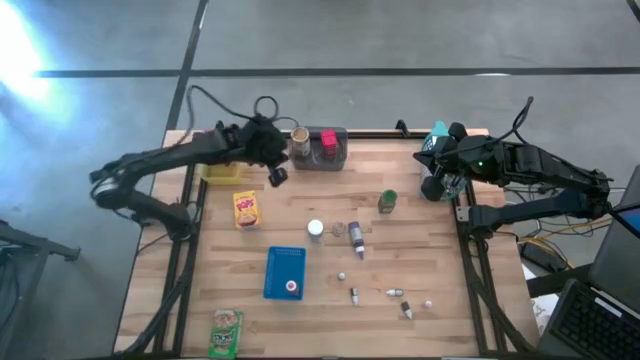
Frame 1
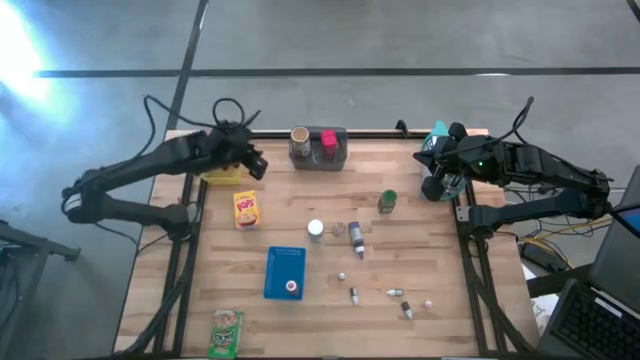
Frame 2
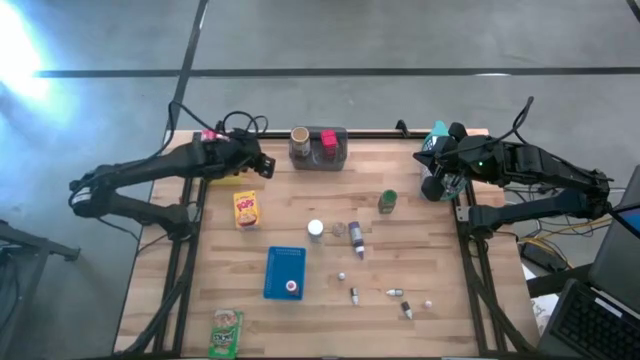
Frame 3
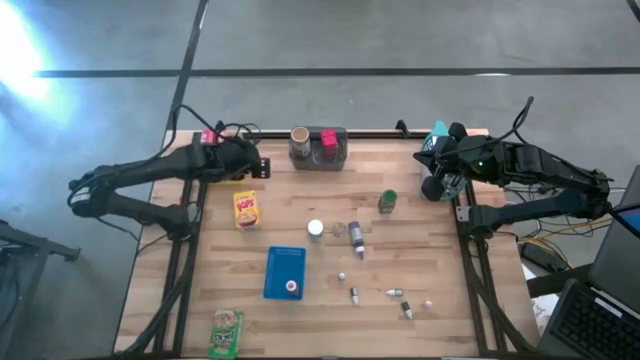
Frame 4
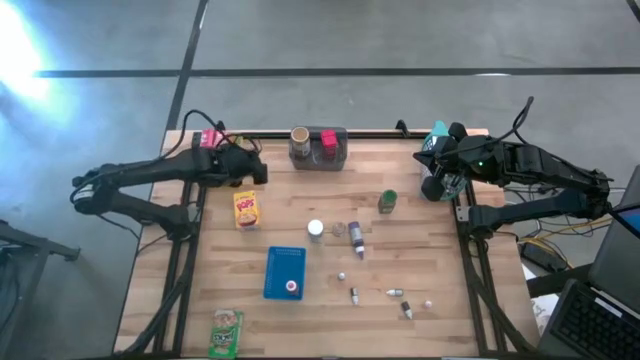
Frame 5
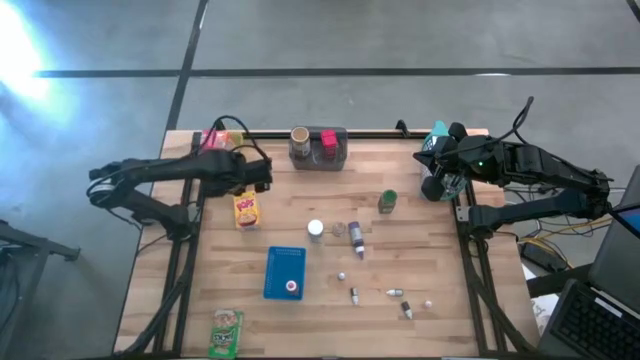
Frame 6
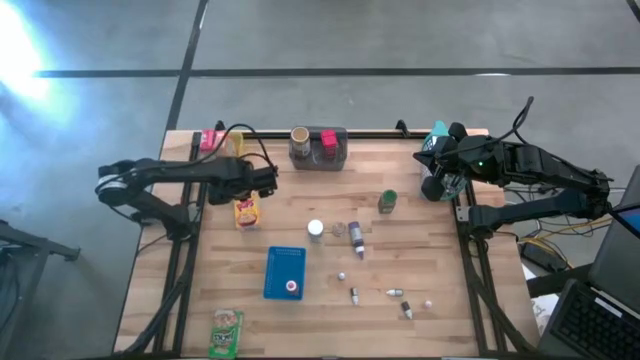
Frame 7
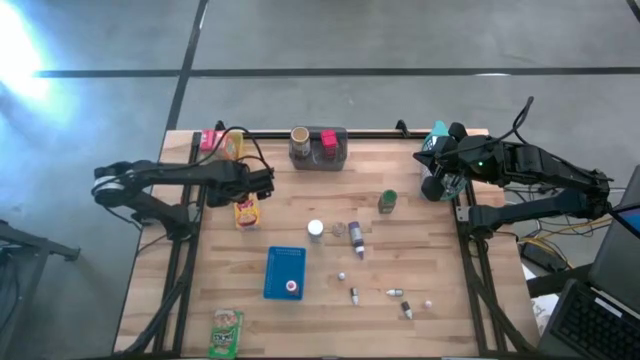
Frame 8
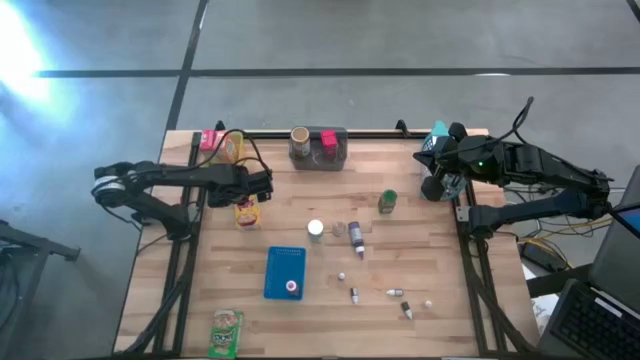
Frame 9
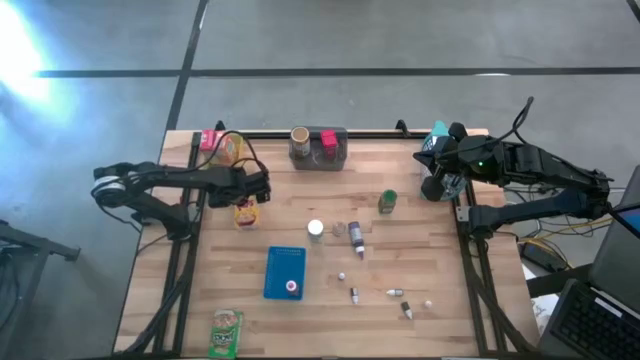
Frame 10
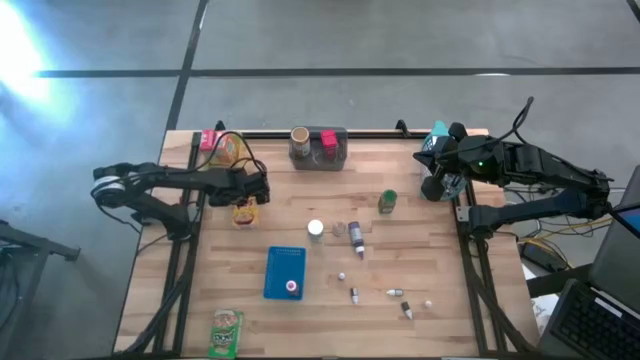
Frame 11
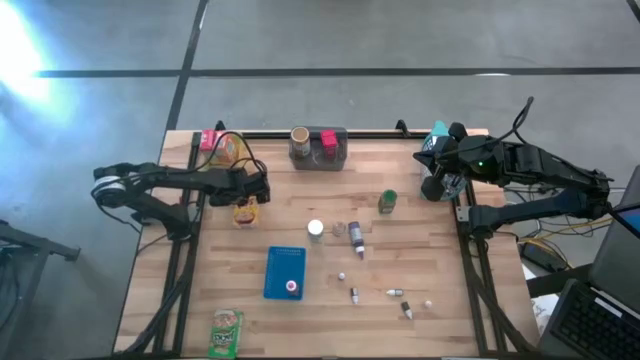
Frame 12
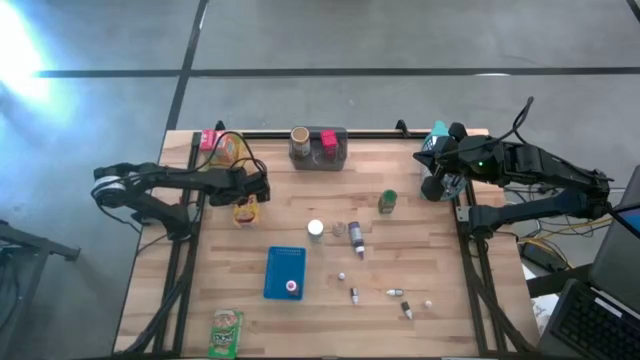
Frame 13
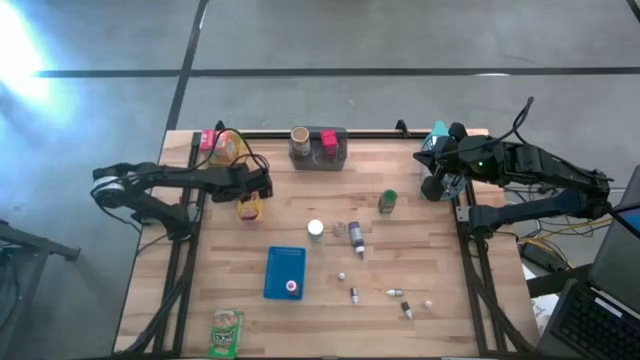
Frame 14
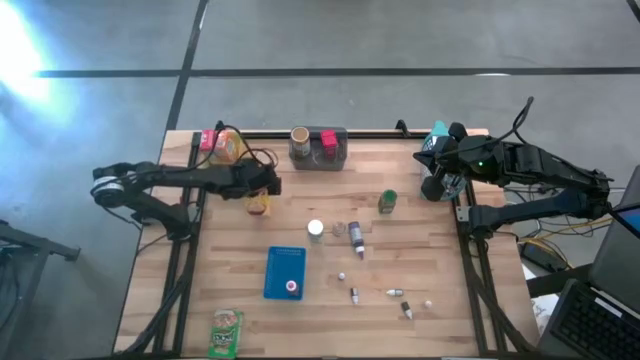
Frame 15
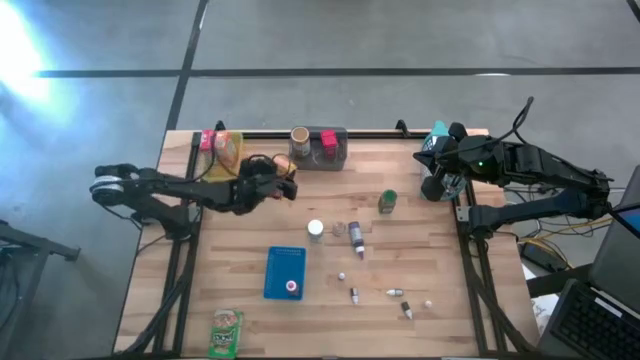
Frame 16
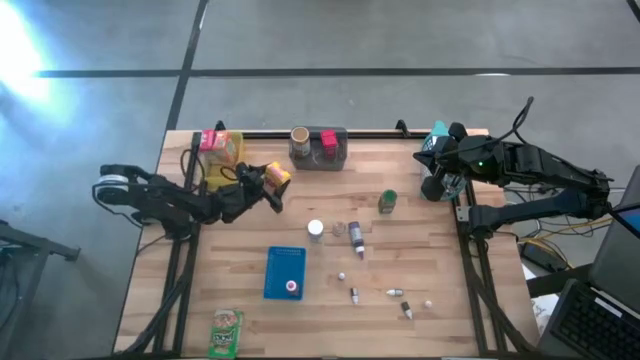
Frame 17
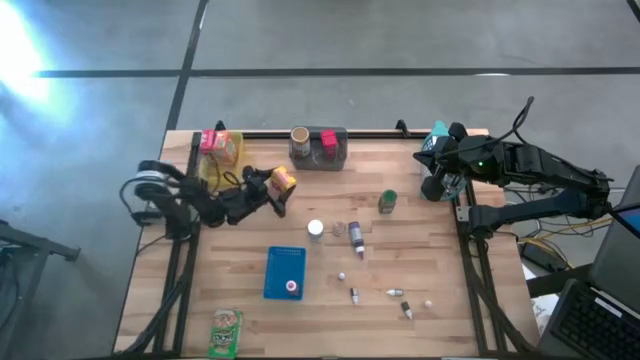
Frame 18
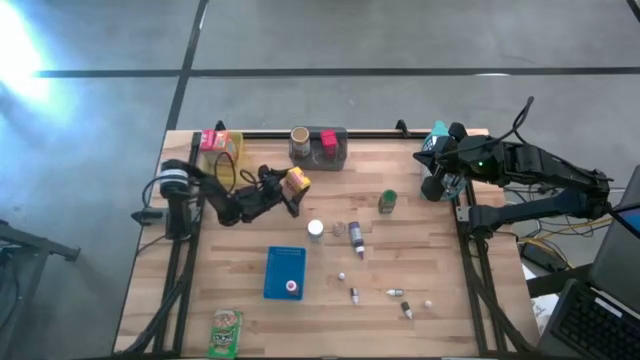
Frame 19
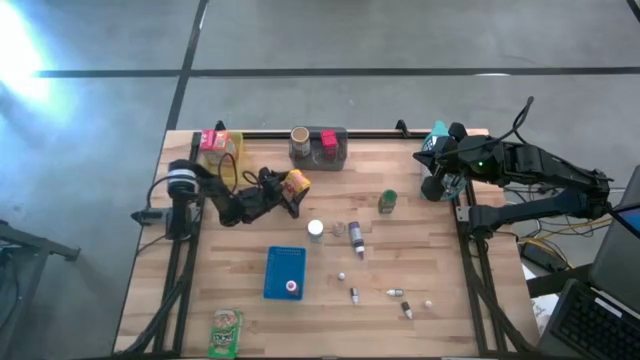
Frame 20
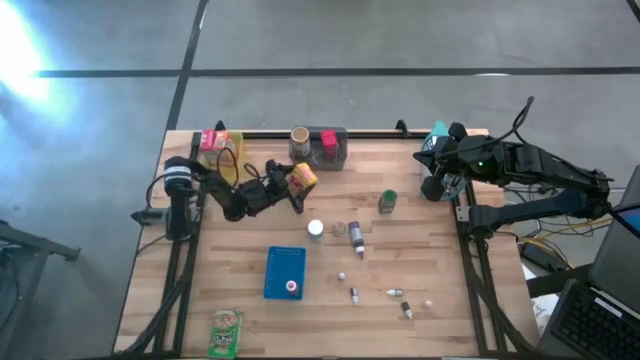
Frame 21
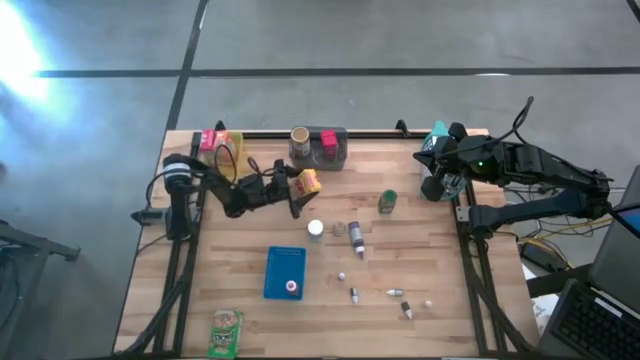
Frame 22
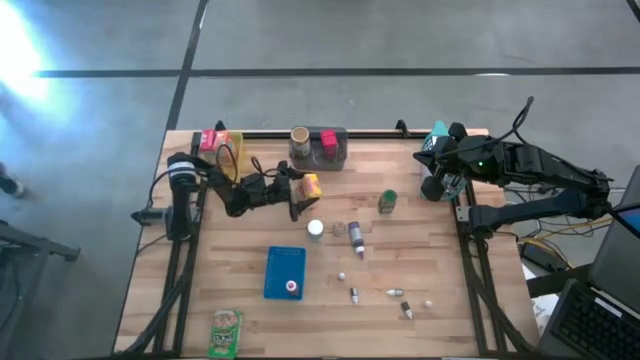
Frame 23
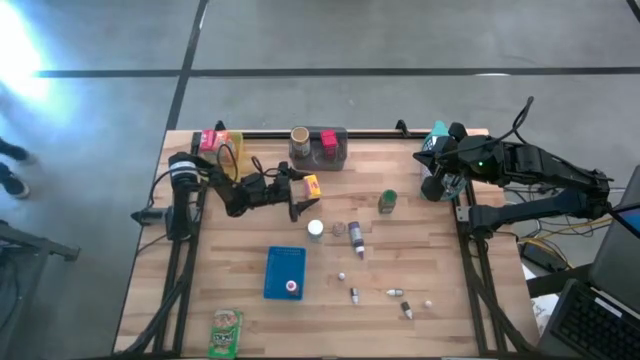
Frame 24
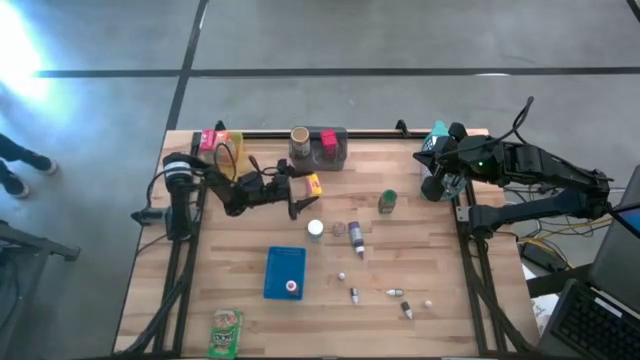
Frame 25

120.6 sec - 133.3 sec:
Task: Pick & Place Kitchen Items
Put the yellow cereal box into the yellow bin

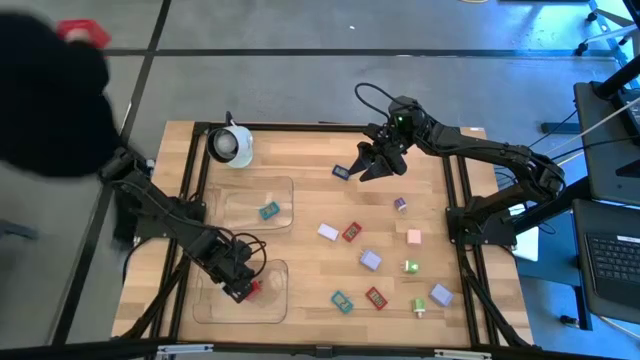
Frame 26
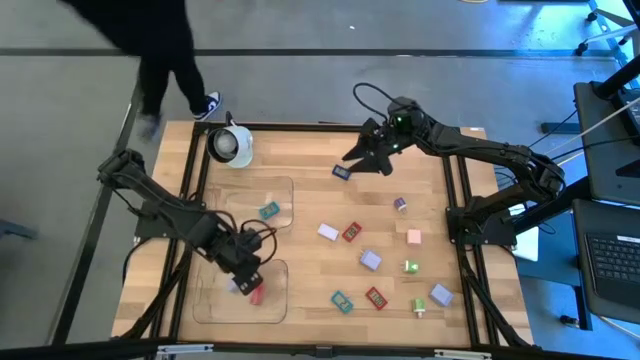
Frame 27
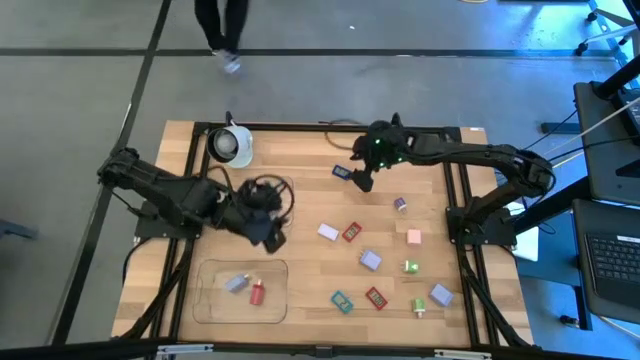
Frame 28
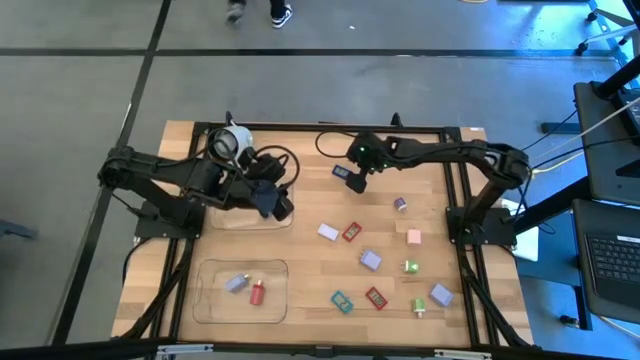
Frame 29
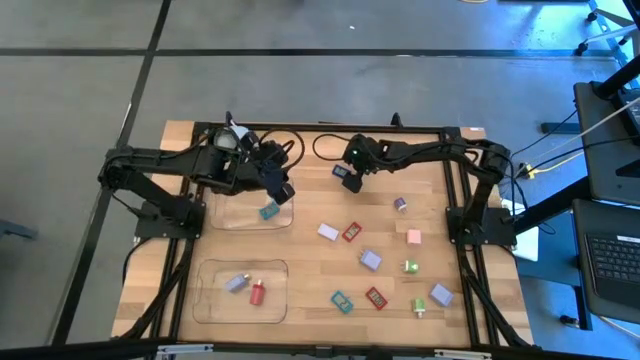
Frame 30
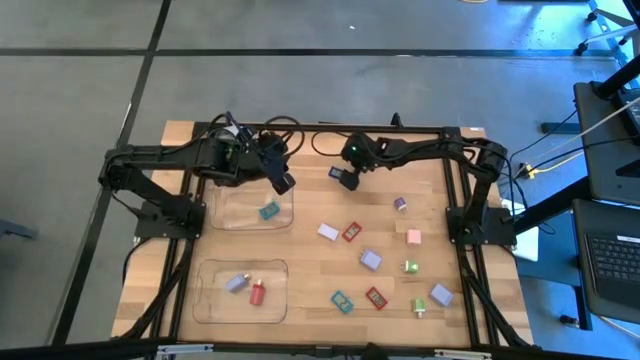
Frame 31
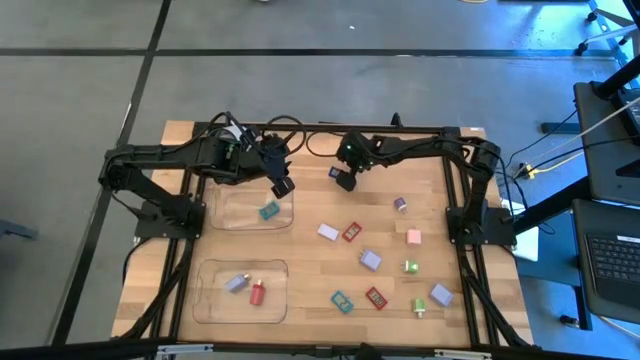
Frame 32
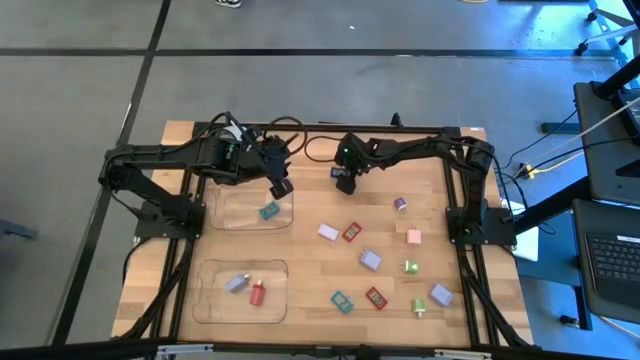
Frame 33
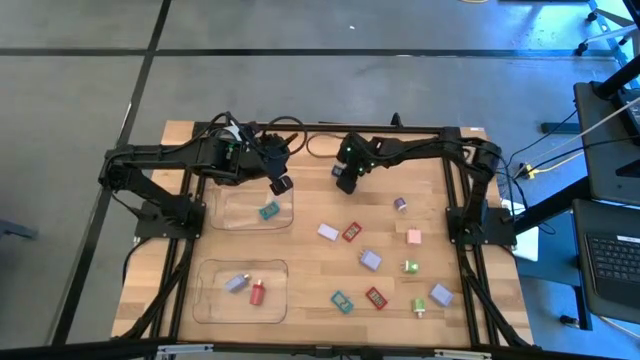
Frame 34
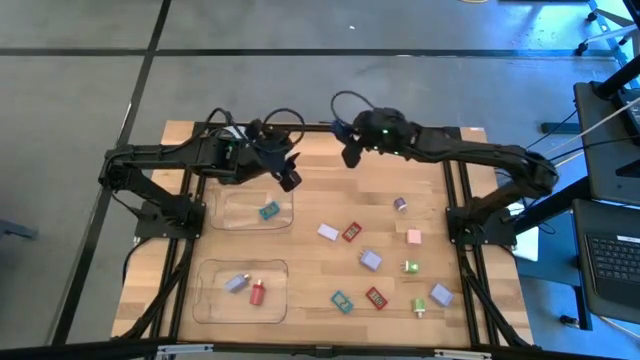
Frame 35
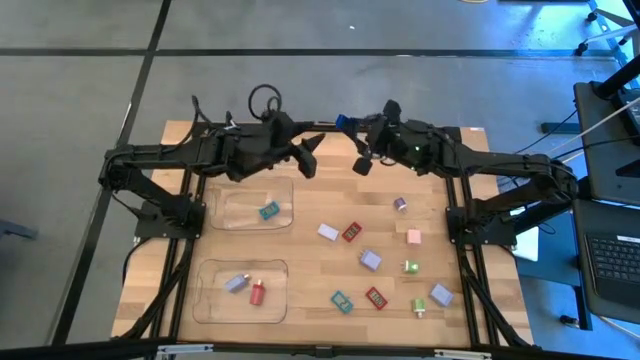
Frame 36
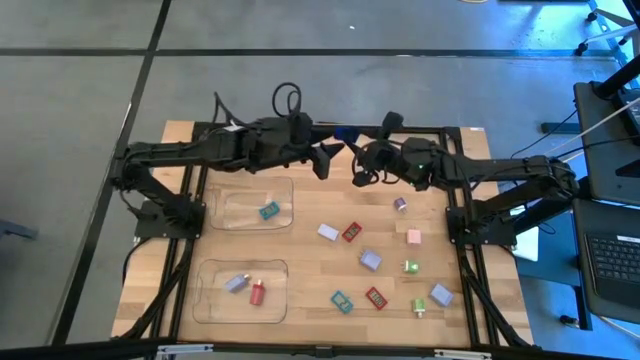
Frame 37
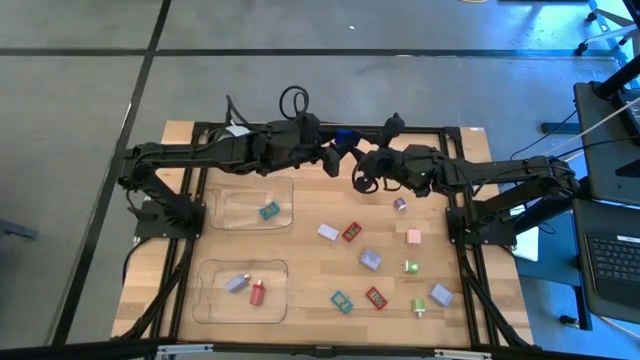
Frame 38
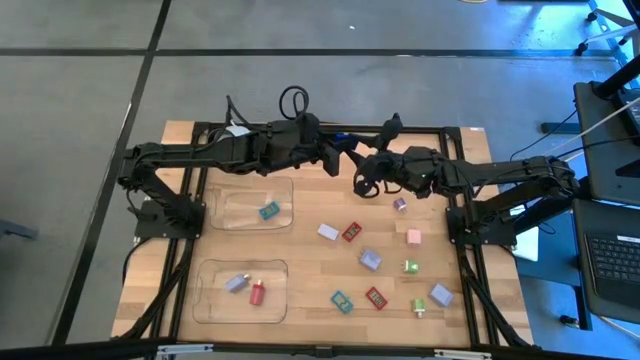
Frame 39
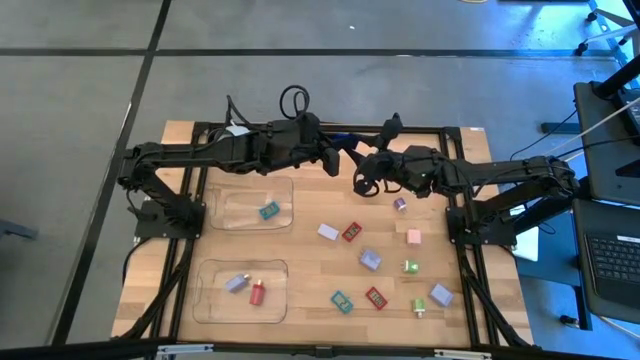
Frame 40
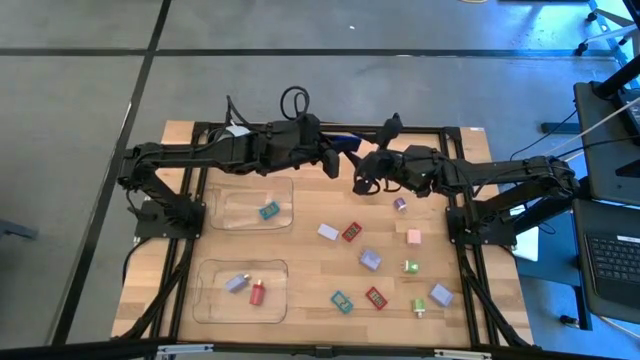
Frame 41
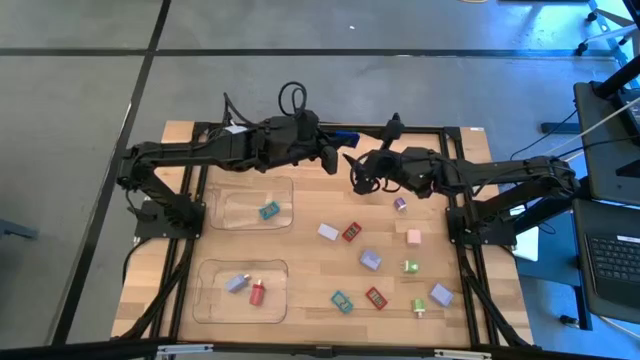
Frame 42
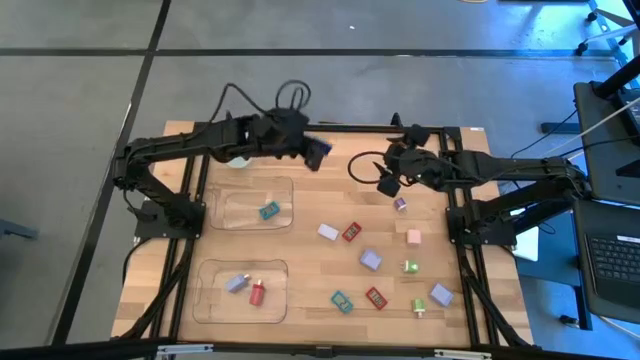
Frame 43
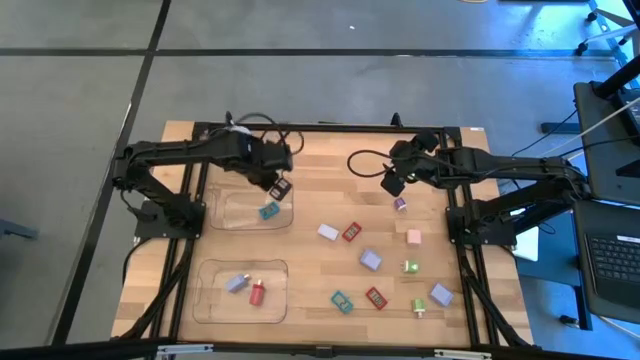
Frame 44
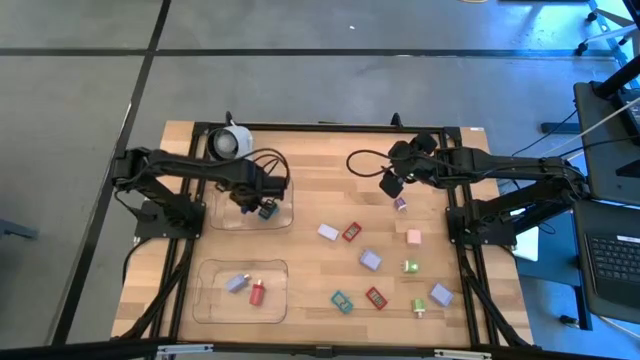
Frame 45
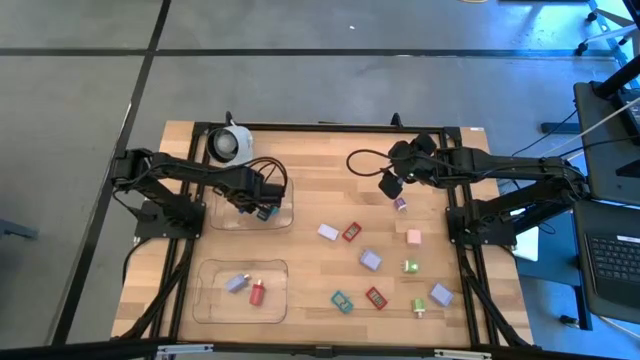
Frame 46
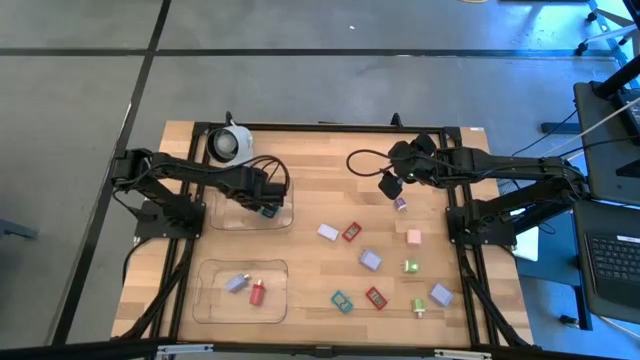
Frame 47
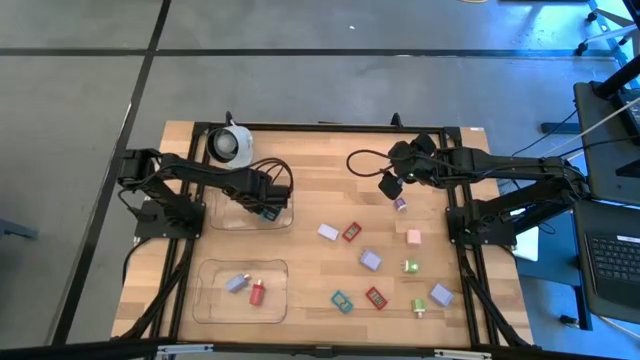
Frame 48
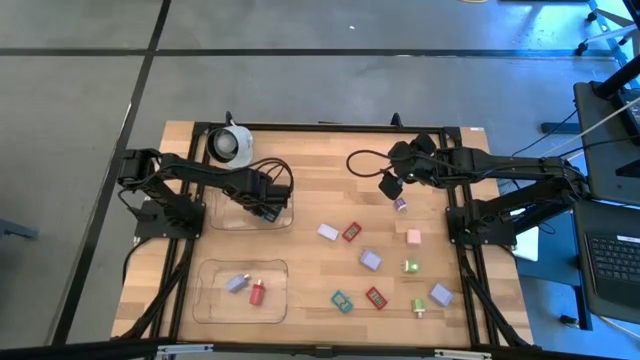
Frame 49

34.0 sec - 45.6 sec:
Task: Pick & Place Office items
Put the dark blue timer into the top transparent bin
